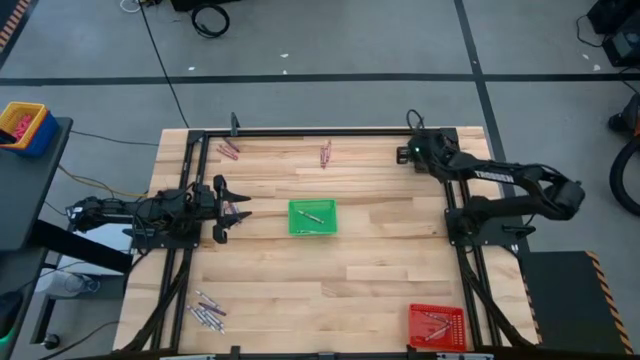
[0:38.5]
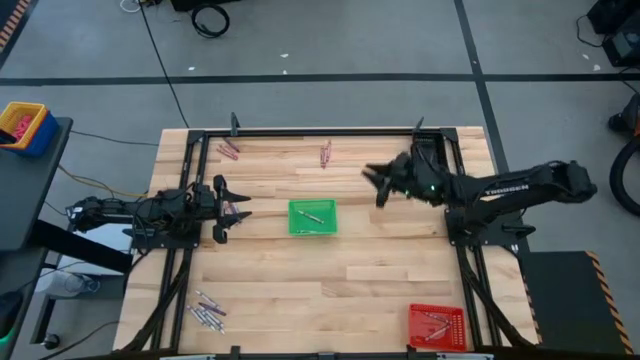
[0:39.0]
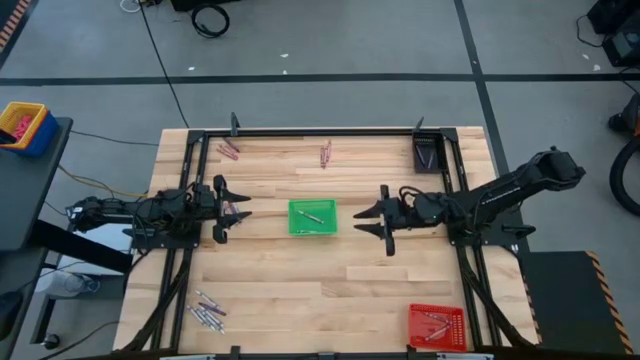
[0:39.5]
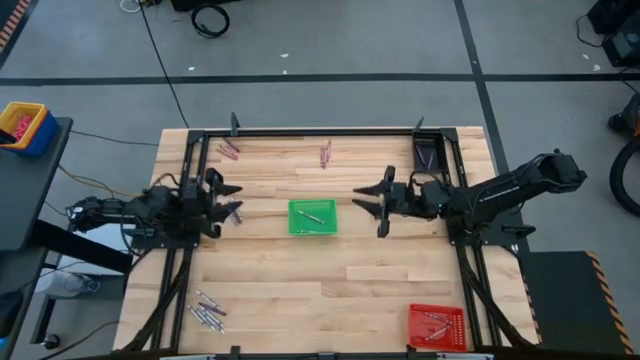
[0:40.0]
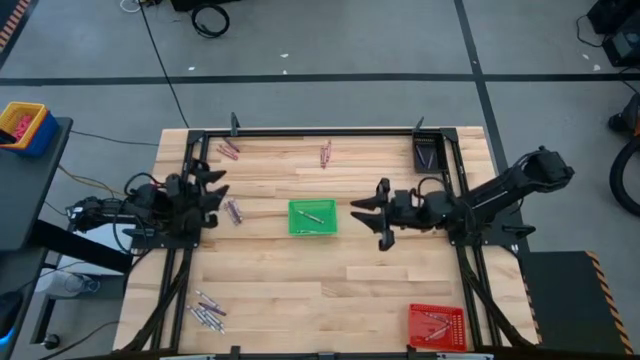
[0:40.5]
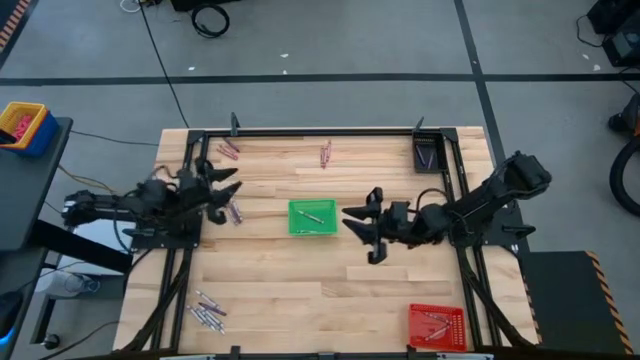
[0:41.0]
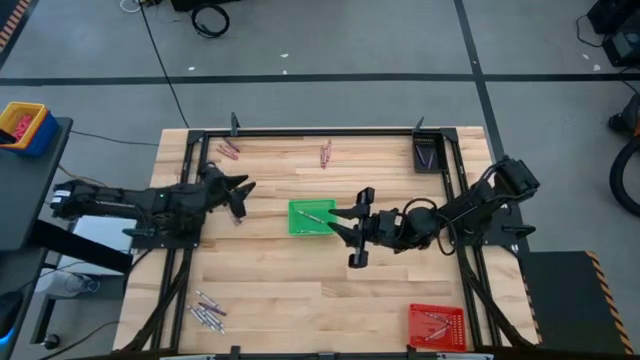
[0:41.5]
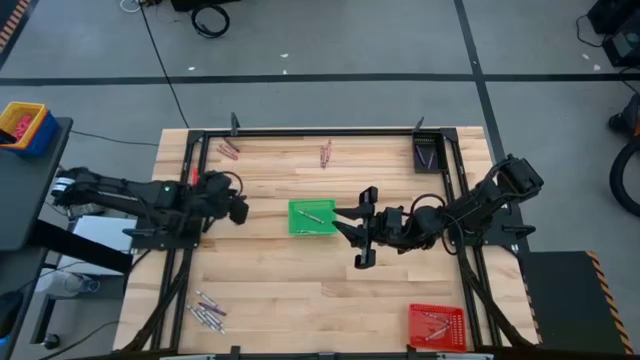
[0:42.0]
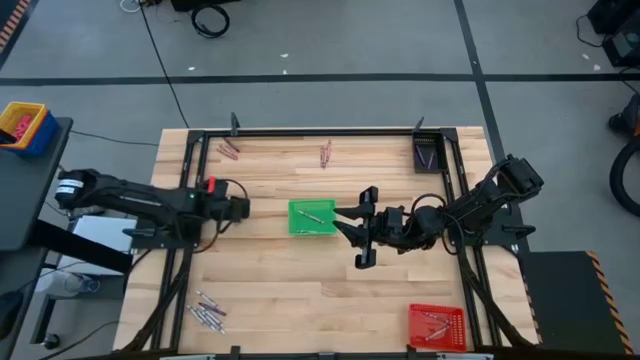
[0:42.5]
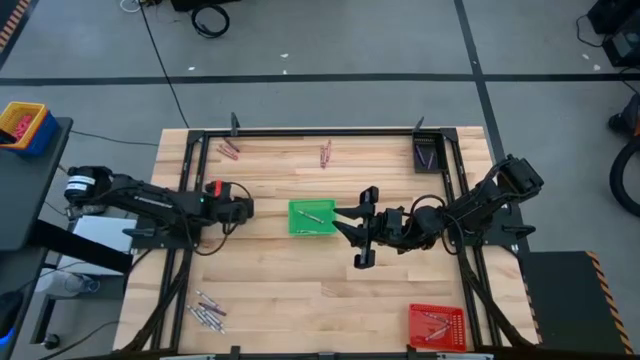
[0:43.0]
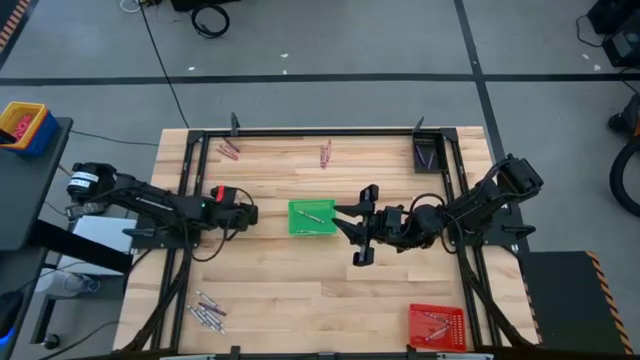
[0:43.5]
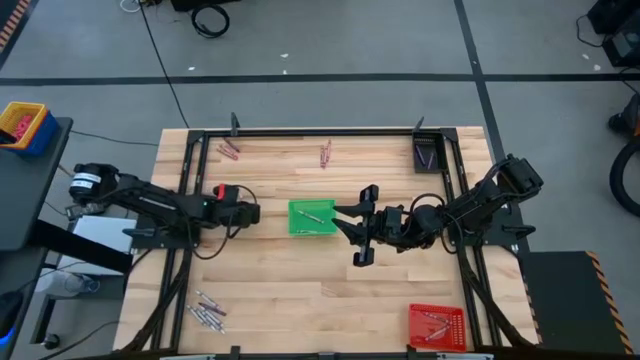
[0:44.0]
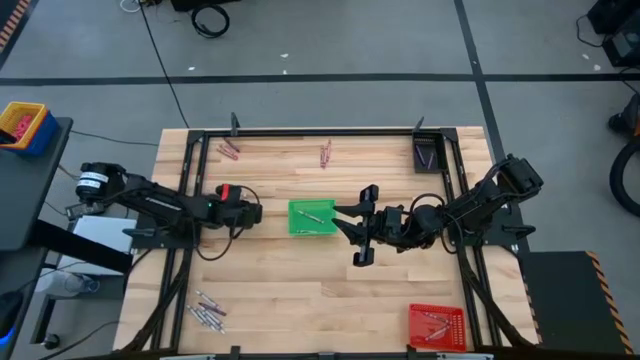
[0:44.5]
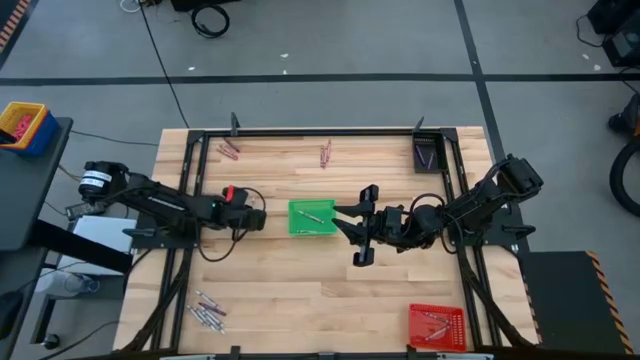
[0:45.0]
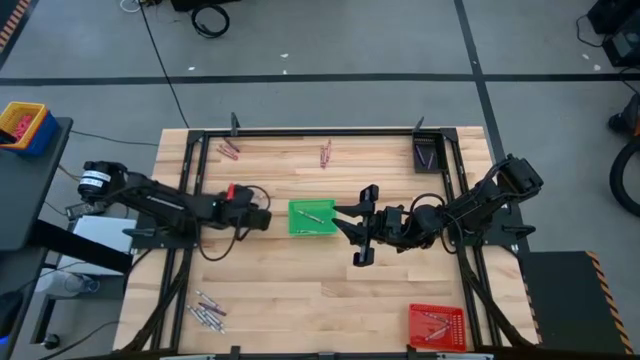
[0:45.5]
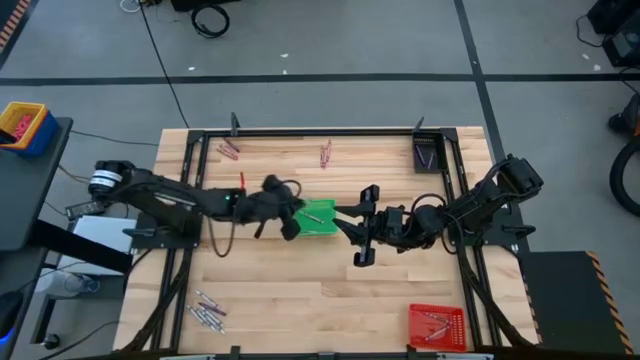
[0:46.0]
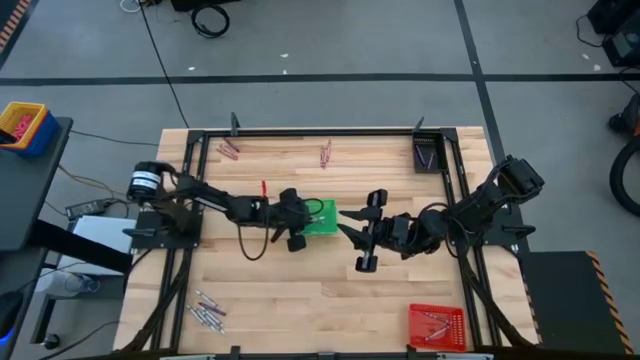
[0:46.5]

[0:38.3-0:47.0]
Task: Sort crayons
Put the white crayon into the green basket

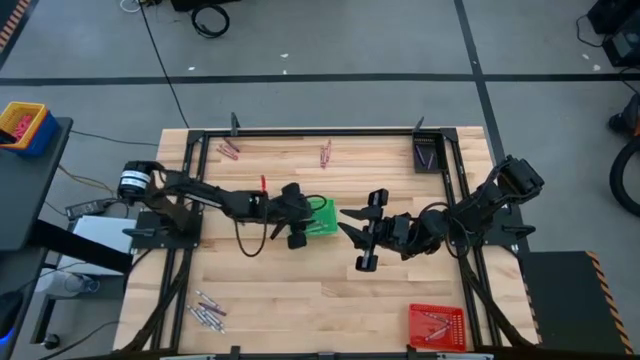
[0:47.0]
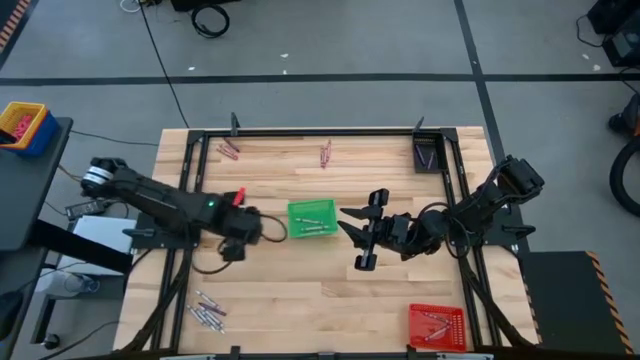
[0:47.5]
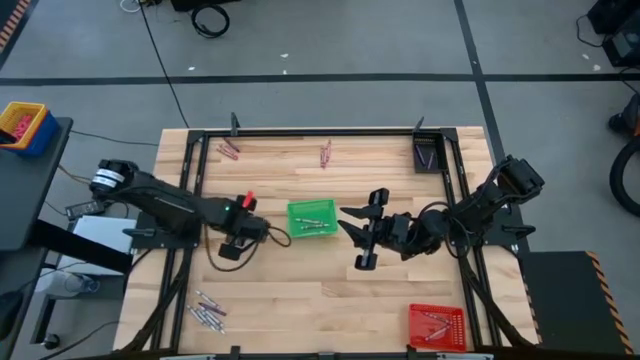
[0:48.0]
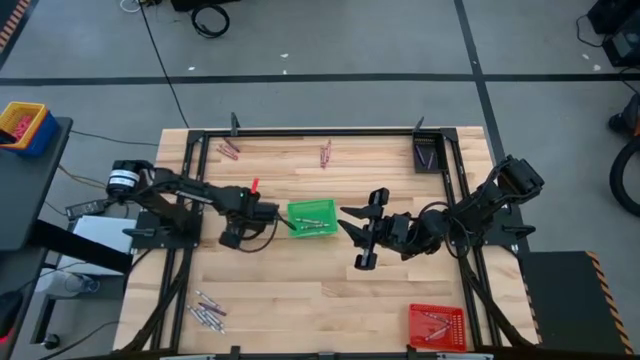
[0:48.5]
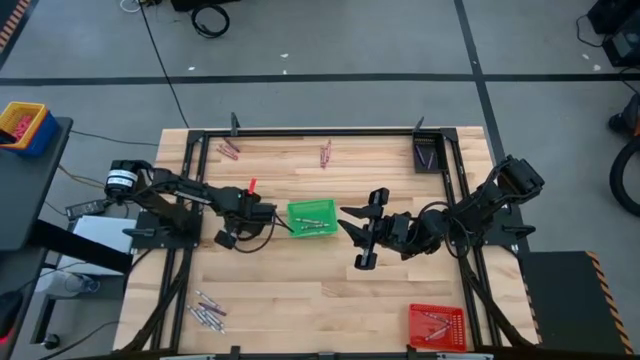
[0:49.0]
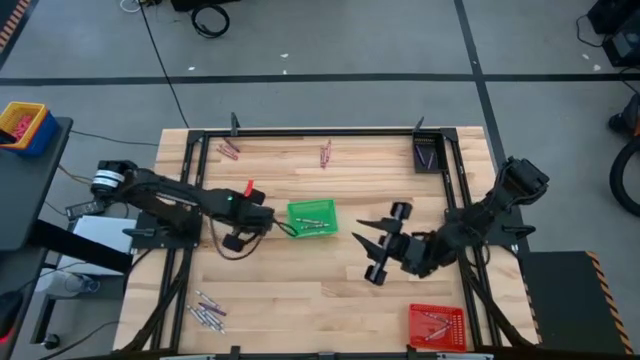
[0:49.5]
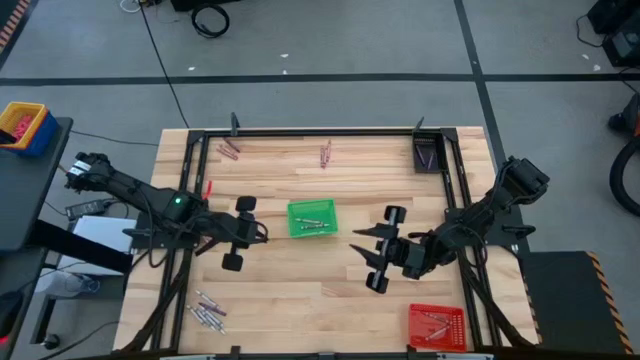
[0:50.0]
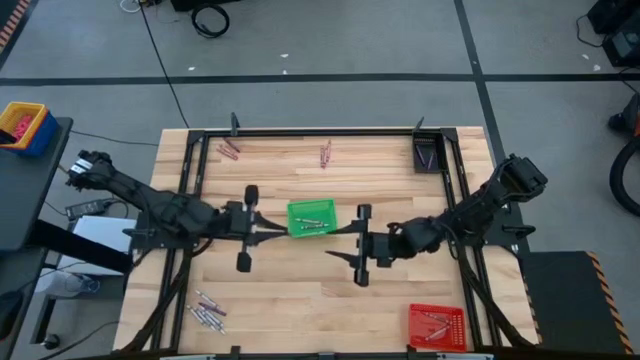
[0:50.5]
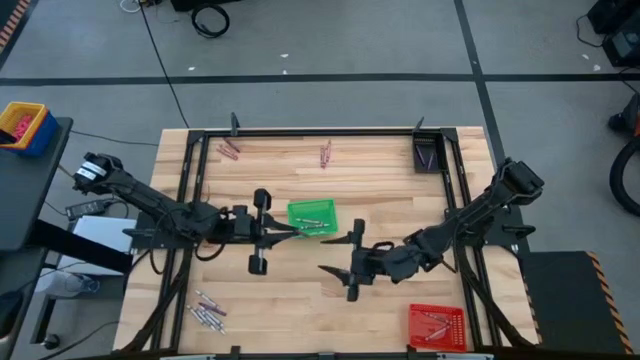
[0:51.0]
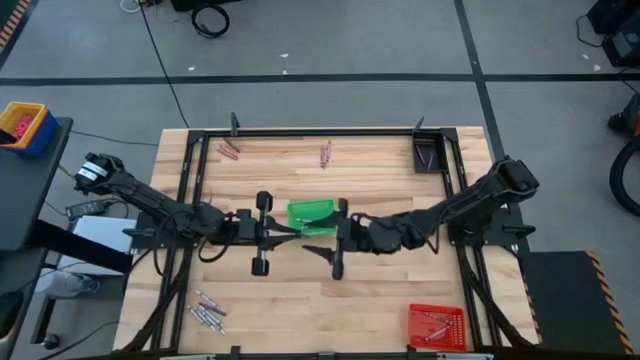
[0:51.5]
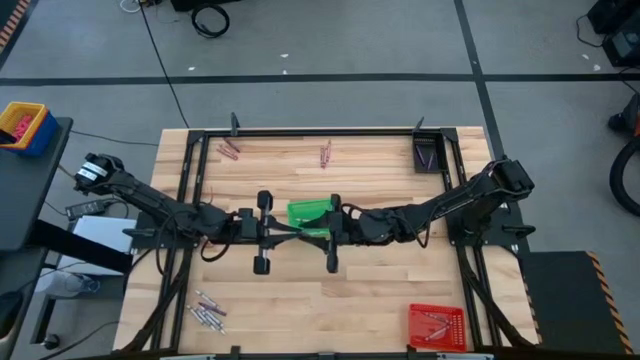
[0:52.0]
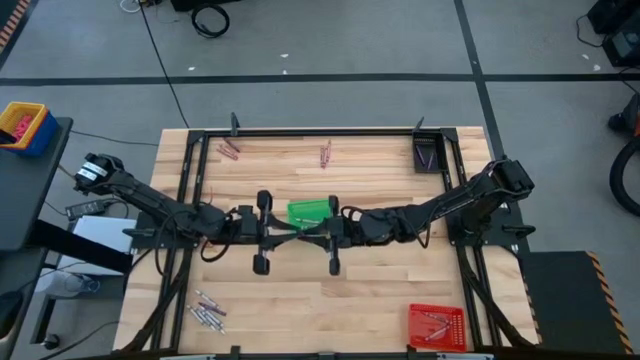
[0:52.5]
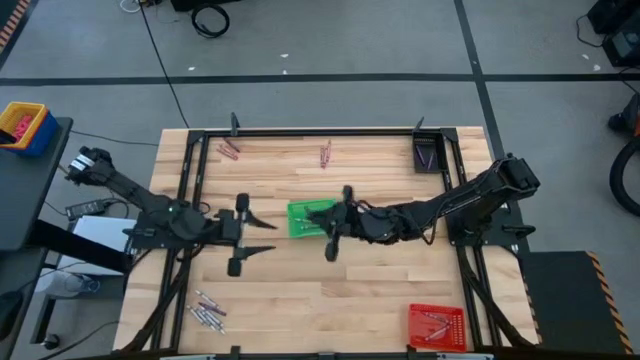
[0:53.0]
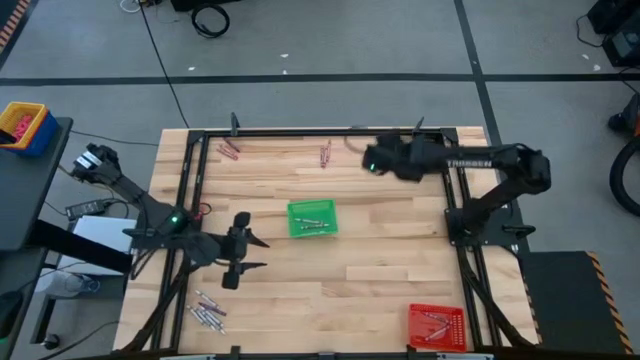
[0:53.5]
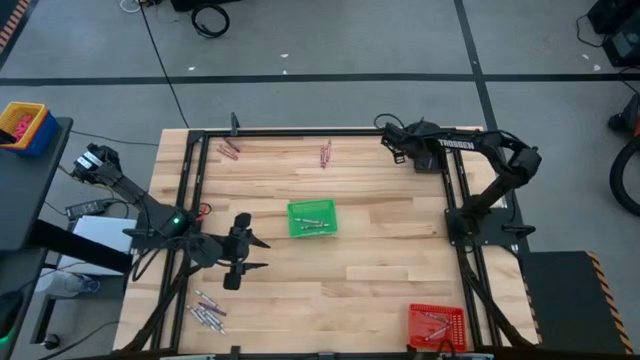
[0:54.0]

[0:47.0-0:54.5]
Put the violet crayon into the black basket

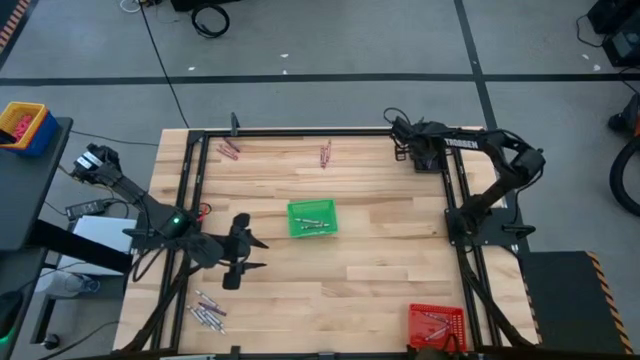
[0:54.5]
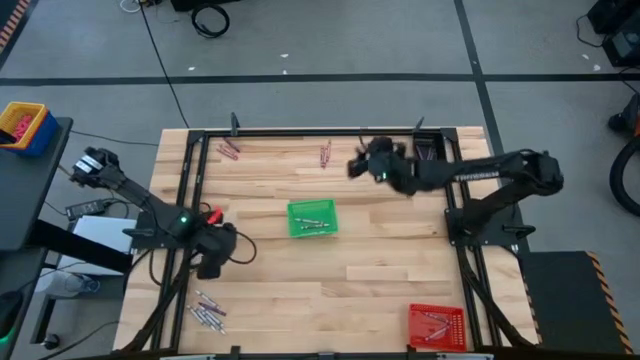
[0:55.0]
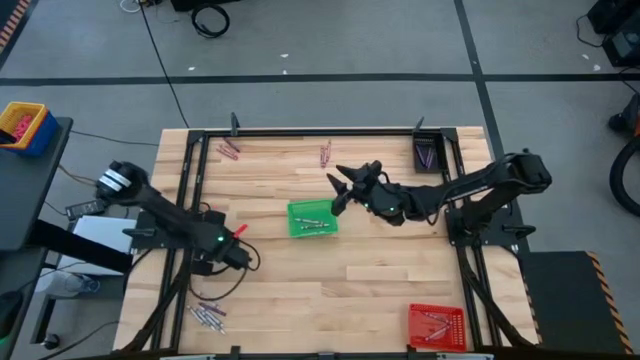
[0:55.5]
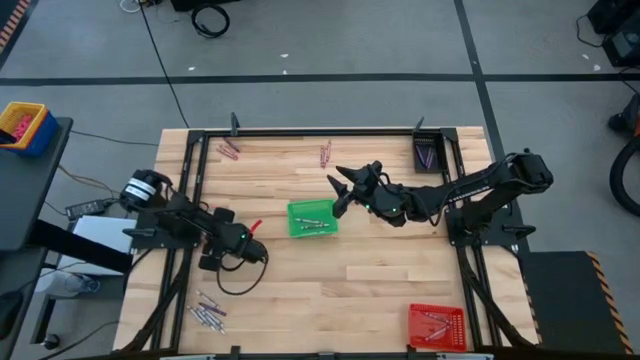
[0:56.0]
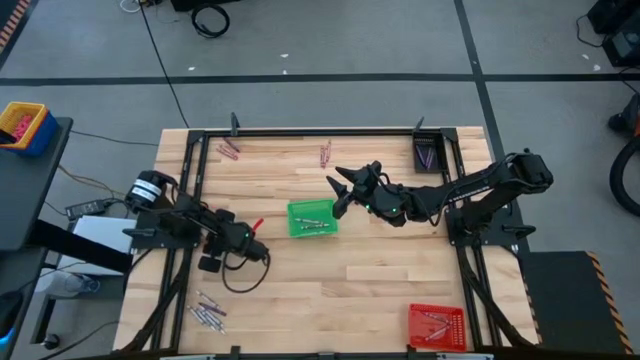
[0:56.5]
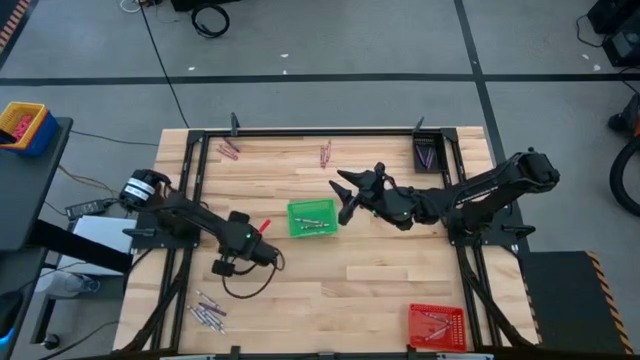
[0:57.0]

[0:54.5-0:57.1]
Put the pink crayon into the red basket

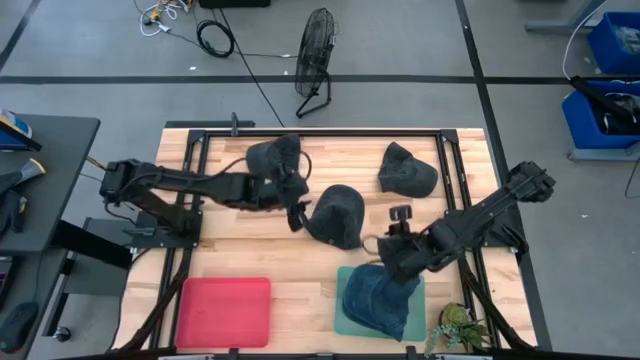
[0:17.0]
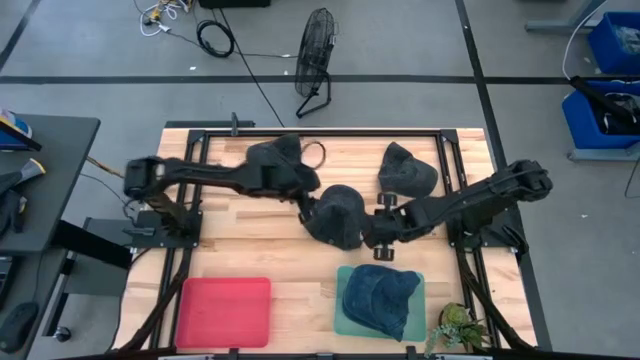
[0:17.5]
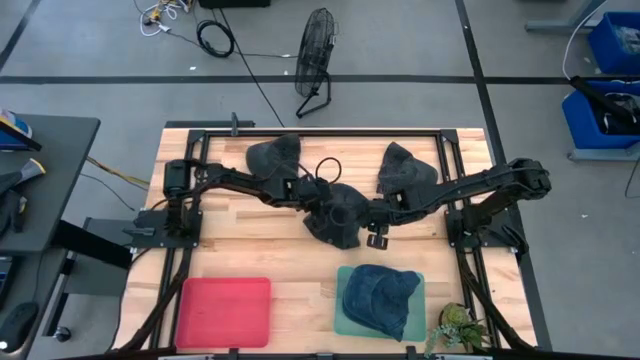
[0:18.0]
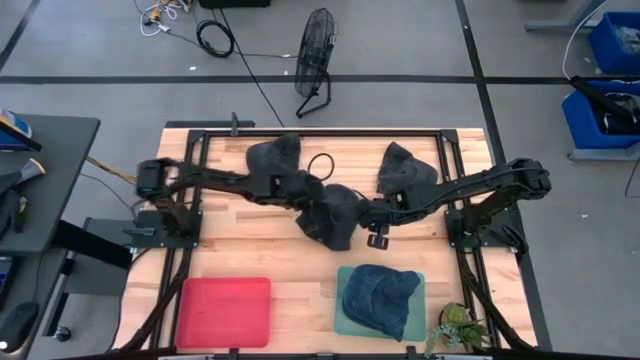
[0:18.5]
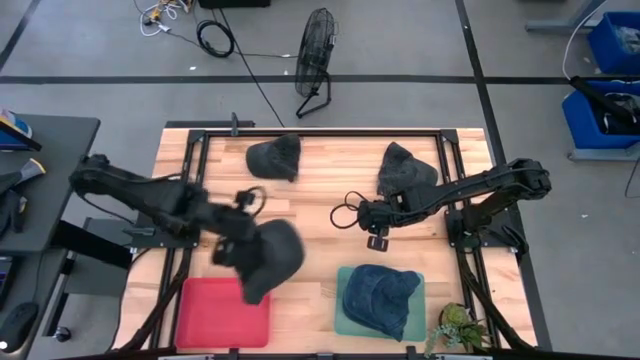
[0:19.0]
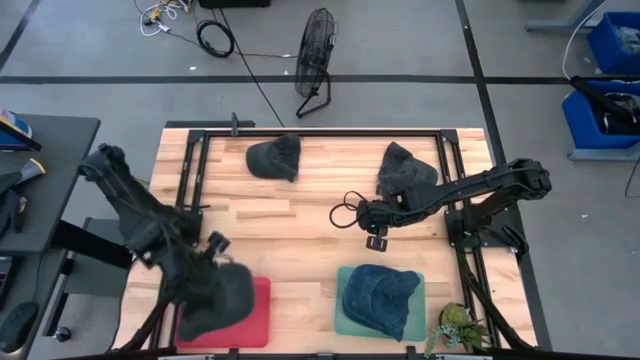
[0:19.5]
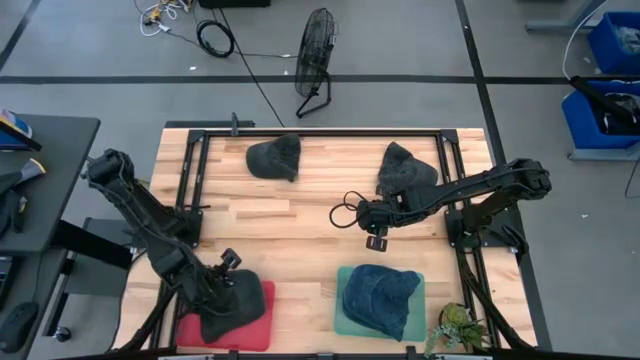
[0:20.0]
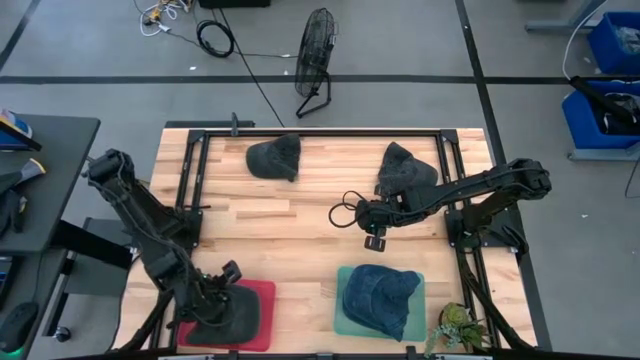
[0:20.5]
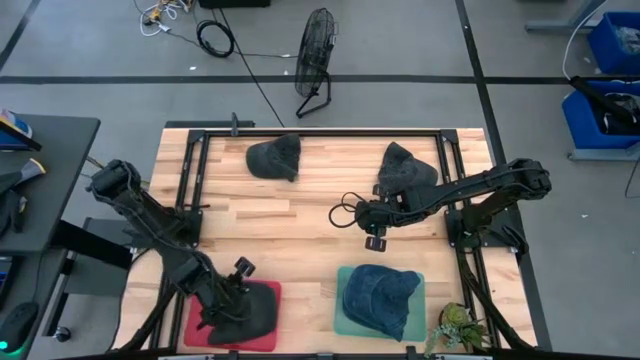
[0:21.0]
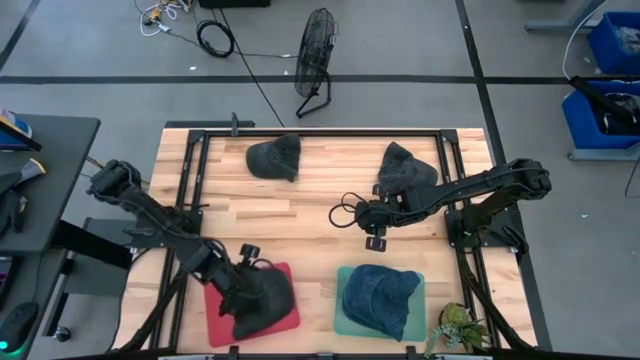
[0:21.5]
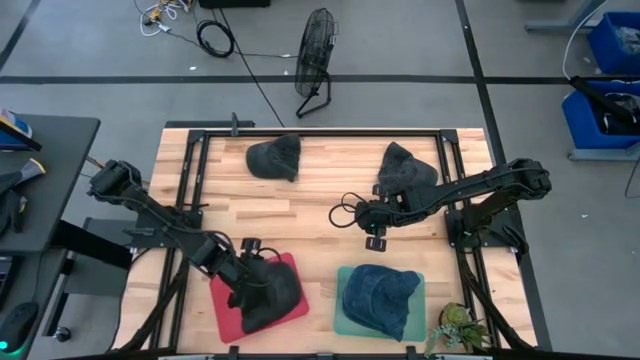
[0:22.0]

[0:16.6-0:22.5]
Task: Pick & Place hat
Put the black cap into the red bin
